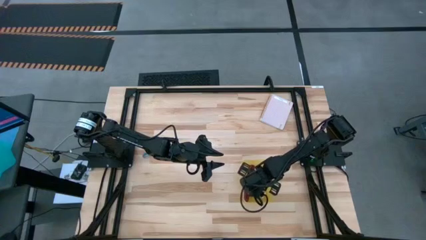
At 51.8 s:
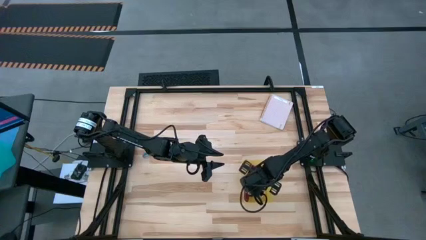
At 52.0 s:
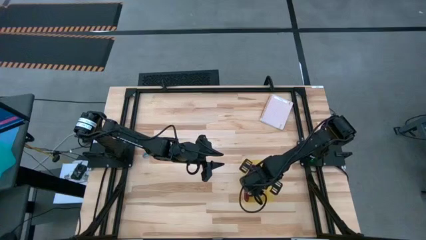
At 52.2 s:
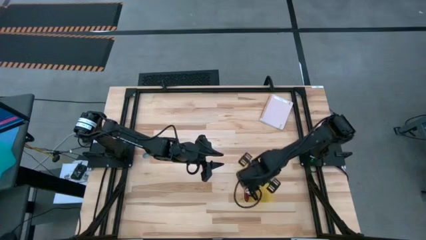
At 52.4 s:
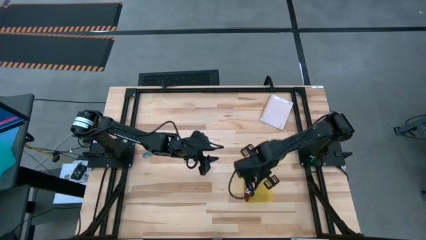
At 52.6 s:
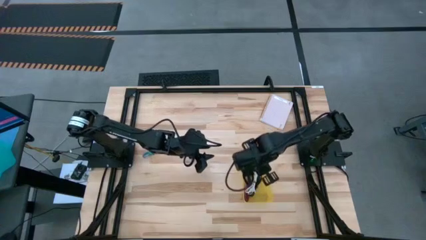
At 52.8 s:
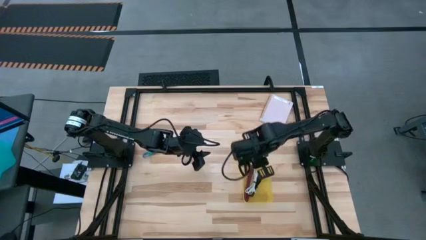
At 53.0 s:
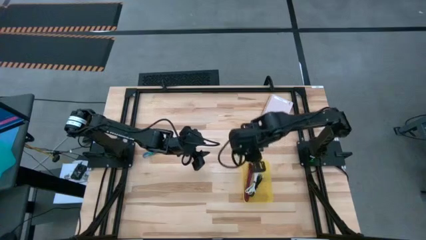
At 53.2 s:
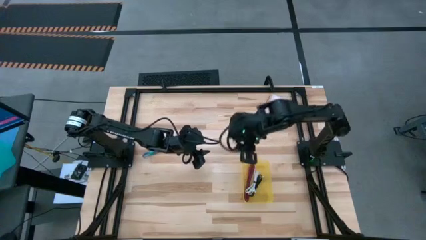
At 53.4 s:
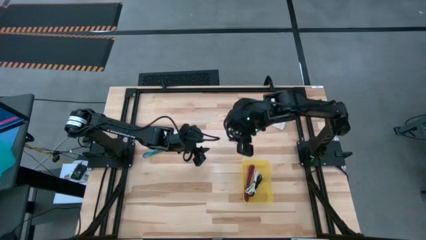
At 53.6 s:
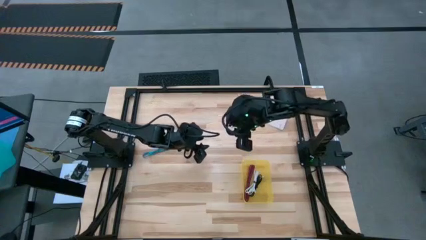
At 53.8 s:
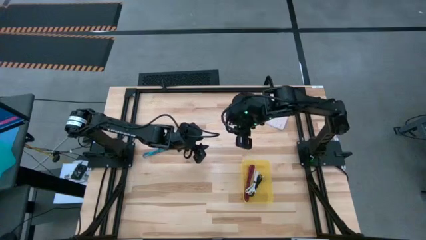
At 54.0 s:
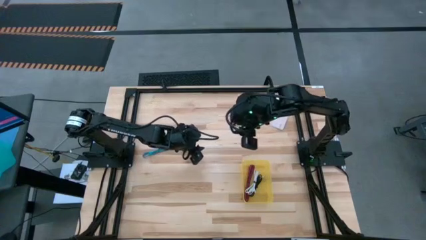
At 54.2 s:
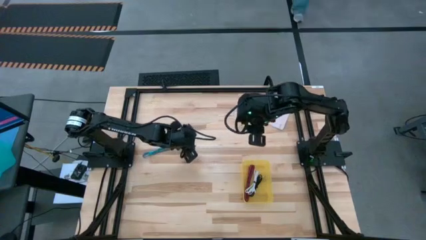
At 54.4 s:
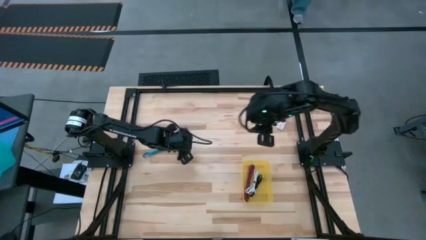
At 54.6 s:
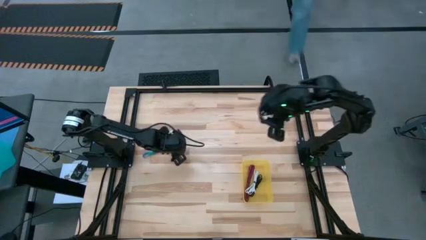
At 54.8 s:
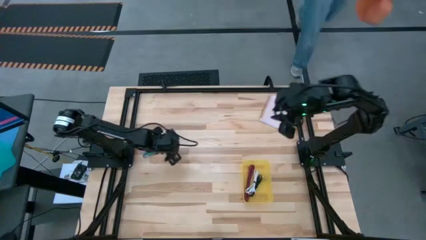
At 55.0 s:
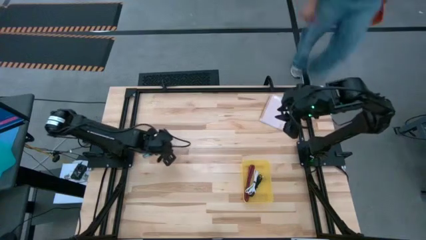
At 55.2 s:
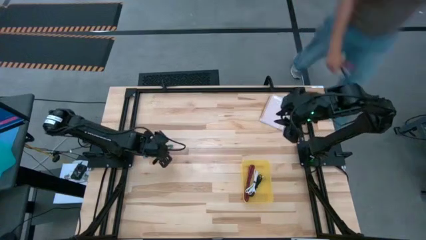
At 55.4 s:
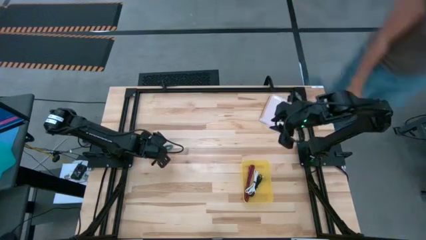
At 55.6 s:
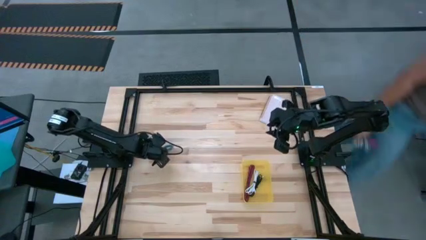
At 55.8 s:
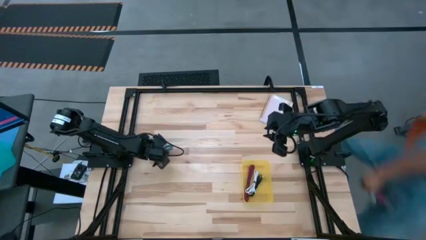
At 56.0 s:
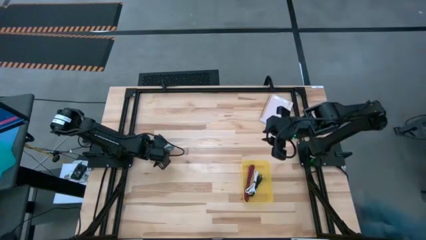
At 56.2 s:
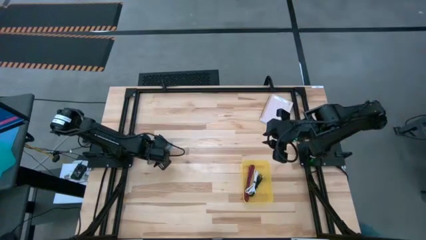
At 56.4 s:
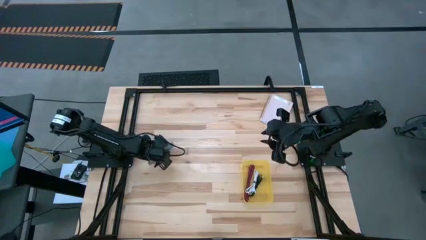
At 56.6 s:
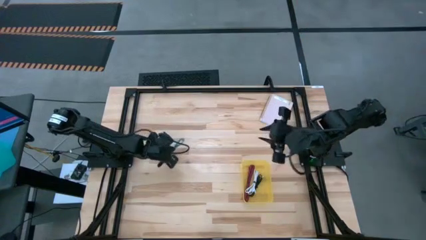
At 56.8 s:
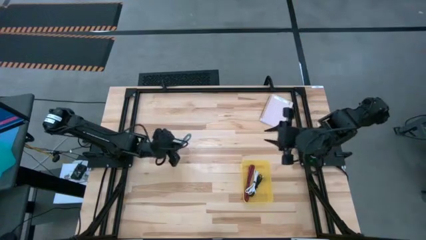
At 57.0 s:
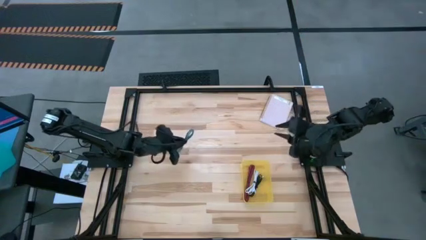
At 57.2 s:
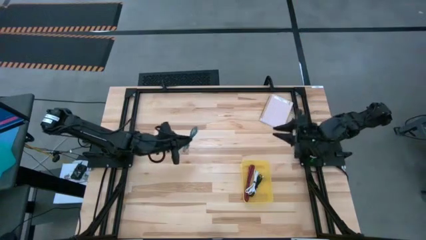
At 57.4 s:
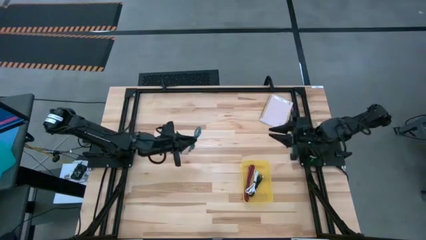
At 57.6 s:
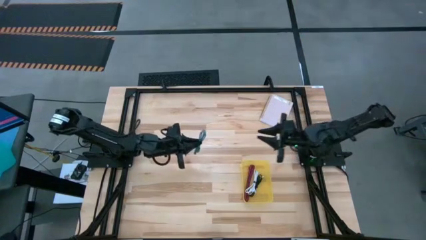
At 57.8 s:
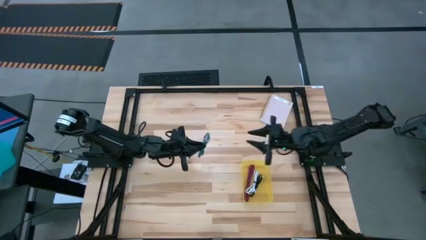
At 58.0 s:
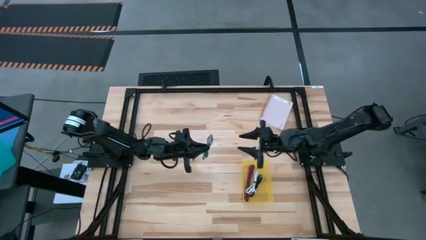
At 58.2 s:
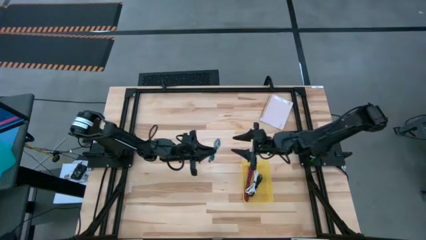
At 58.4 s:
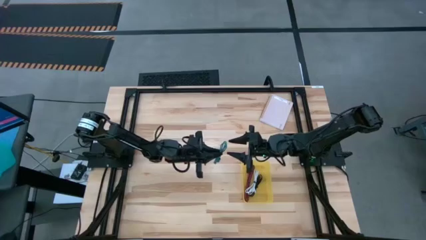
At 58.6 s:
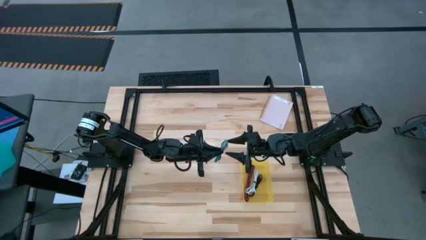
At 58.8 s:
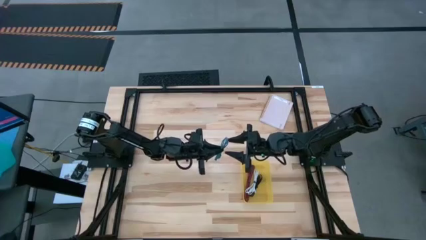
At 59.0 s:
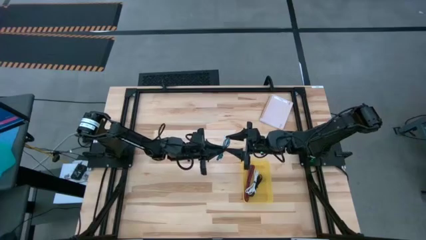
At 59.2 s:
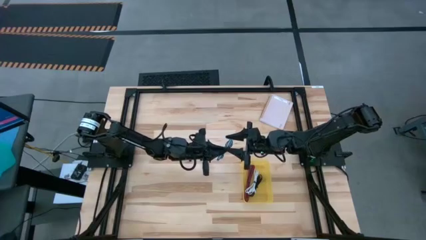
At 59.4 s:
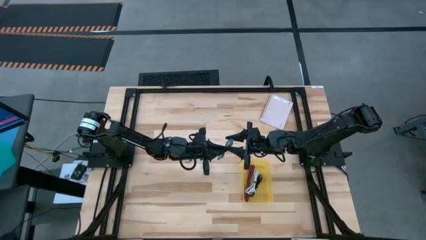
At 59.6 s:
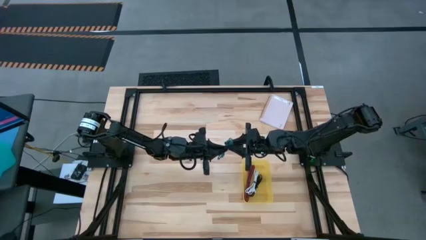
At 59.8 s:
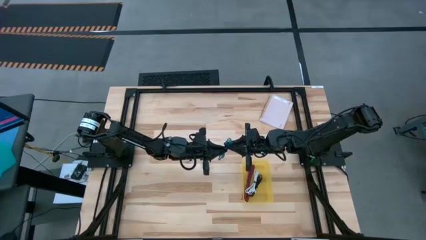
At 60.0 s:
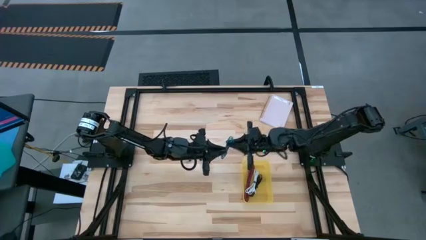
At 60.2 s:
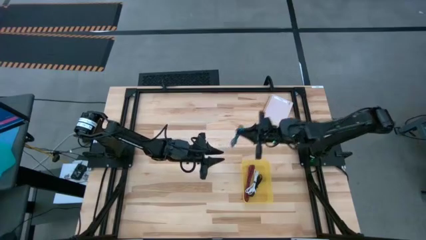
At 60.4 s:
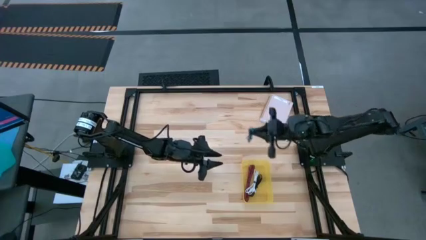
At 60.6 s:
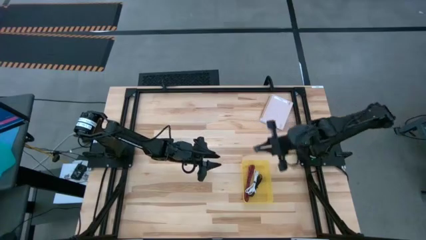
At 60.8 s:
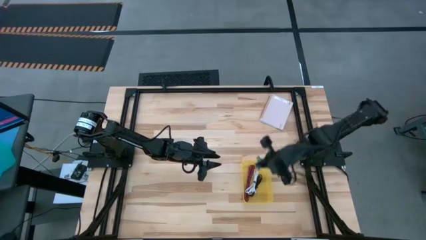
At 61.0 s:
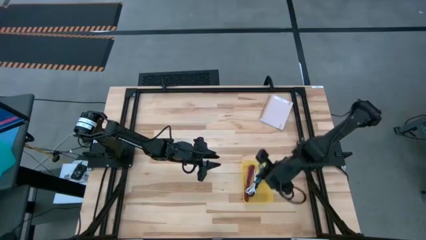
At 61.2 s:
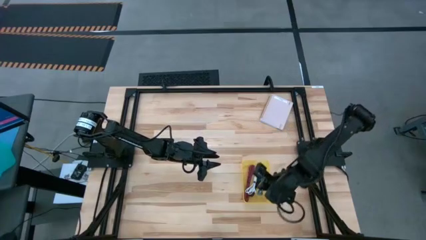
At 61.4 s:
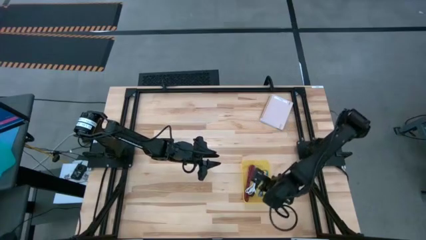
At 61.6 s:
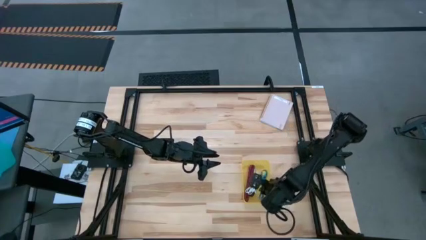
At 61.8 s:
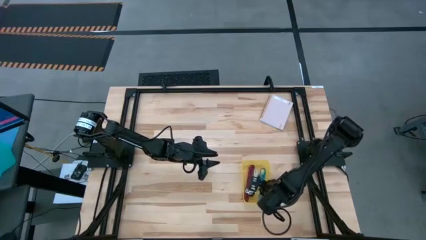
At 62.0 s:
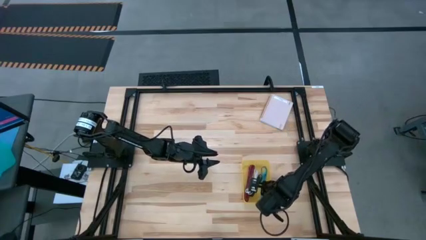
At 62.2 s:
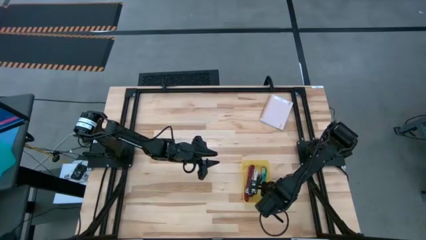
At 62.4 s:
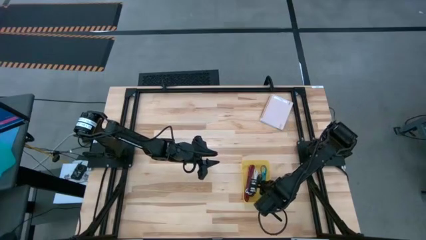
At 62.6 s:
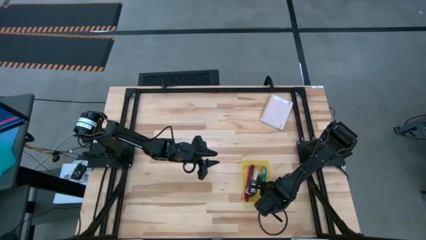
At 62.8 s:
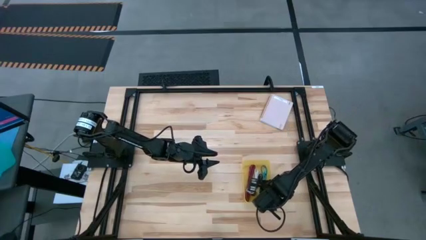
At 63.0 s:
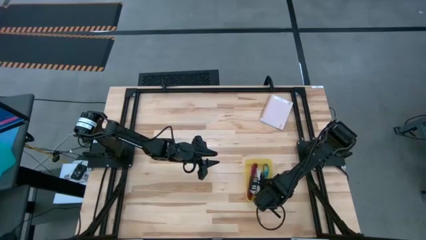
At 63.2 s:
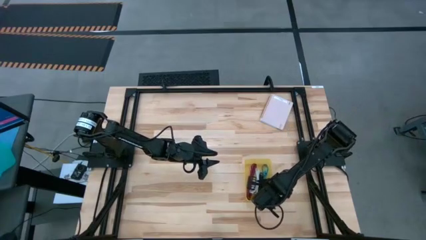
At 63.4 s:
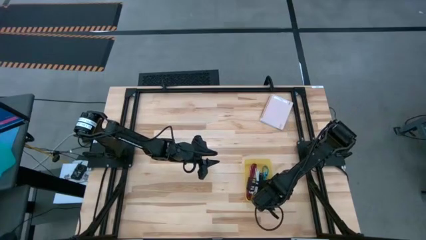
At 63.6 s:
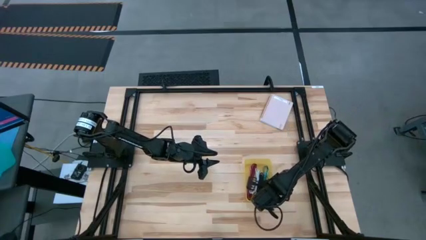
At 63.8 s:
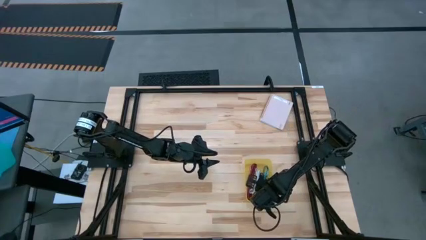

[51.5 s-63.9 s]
Task: Pick and place USB-C Cables
Put the black blue cable charger into the yellow bin

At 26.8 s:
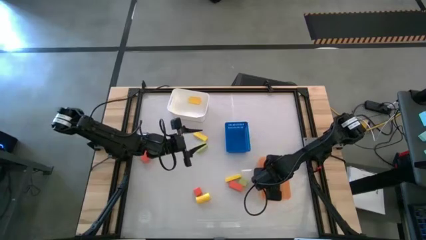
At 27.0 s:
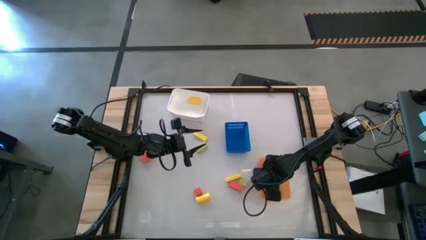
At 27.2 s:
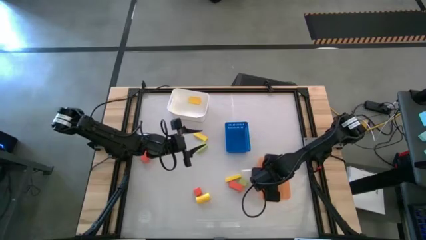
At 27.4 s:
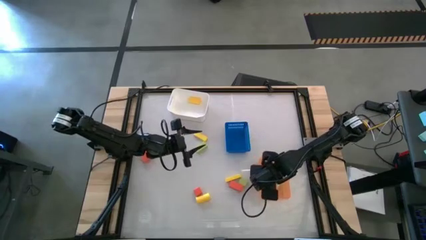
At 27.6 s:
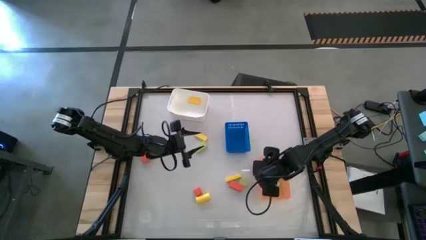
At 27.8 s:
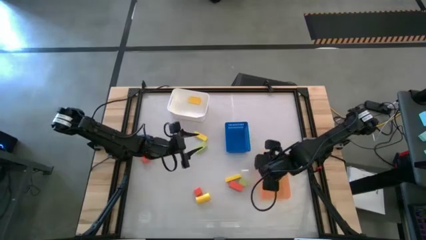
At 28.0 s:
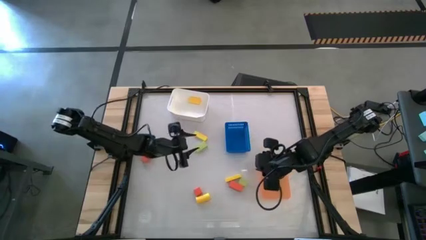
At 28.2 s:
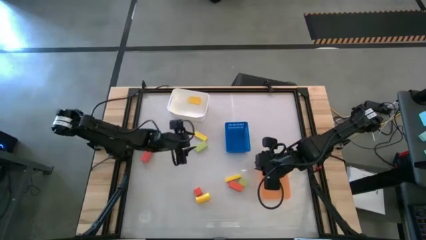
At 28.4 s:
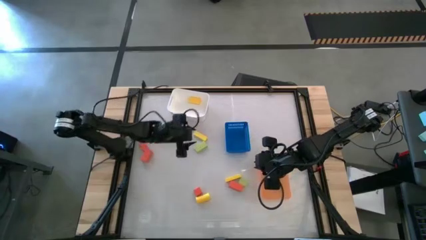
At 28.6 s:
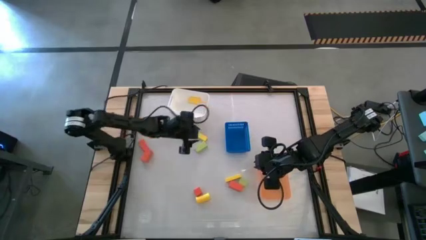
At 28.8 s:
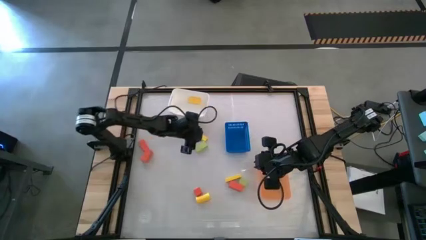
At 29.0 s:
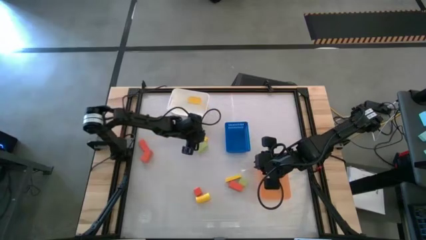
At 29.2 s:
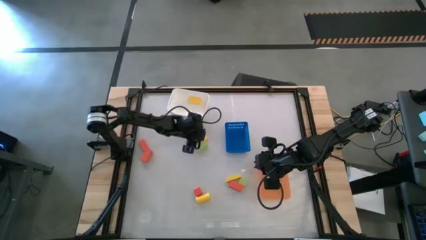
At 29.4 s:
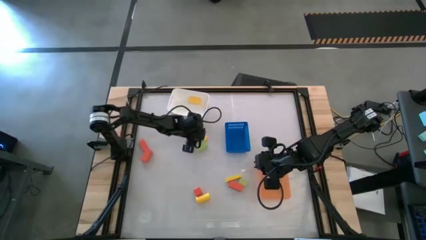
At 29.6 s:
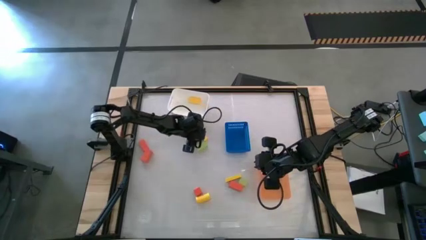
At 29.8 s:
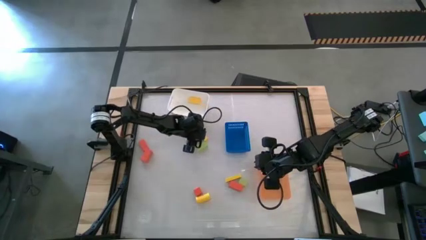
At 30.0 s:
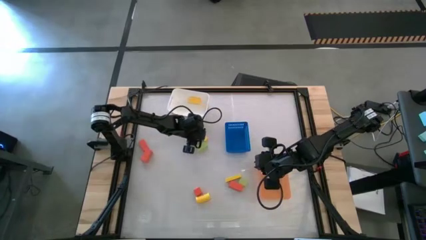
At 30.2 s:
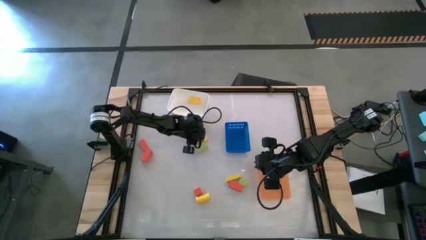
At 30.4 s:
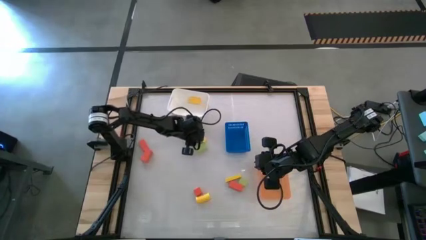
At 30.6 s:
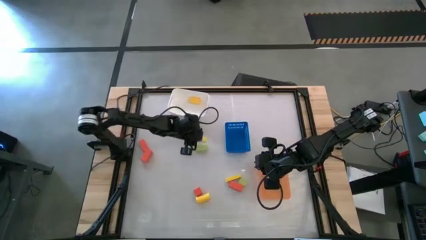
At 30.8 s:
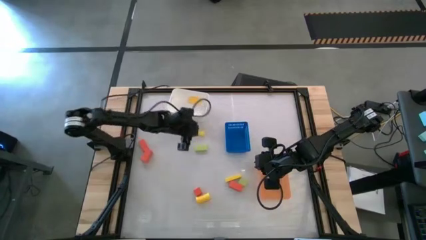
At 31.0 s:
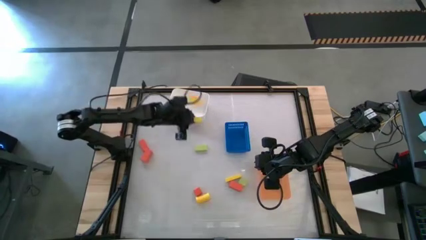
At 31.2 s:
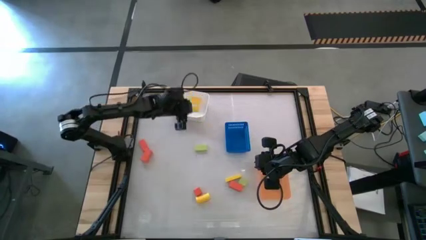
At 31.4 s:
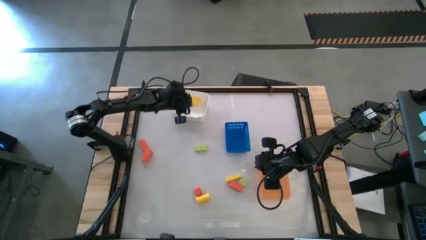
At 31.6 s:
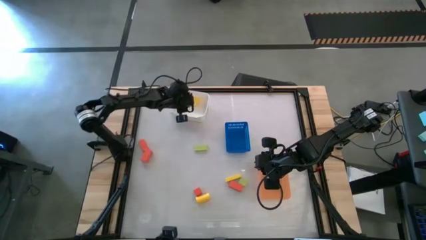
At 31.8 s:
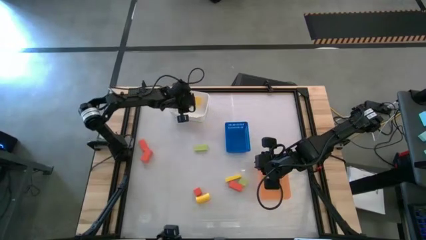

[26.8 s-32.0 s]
Task: Sort & place blocks by color
Put yellow block into the white bin
